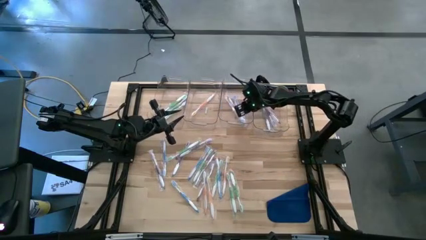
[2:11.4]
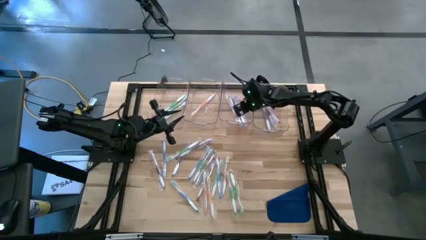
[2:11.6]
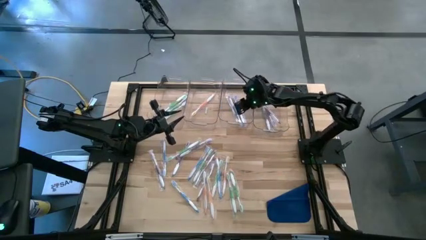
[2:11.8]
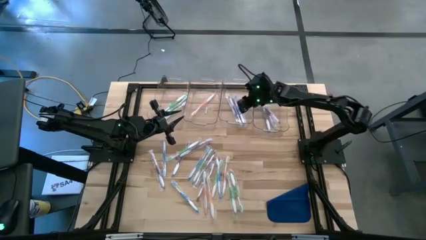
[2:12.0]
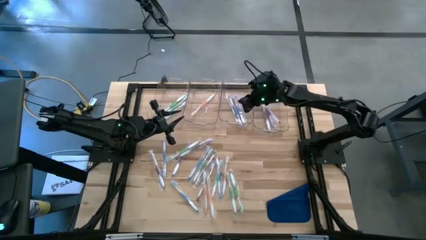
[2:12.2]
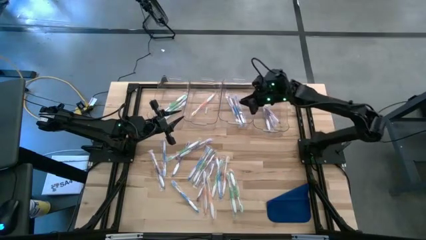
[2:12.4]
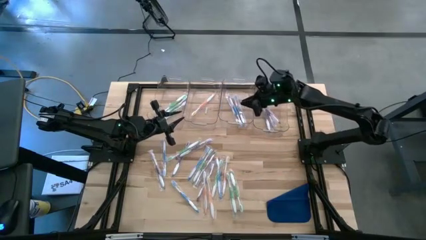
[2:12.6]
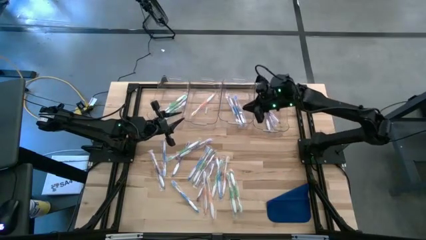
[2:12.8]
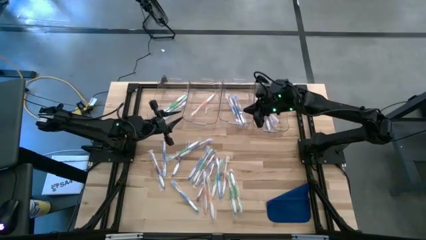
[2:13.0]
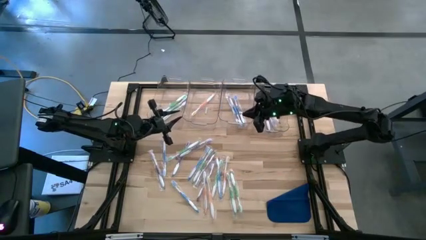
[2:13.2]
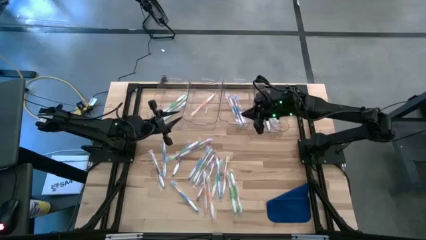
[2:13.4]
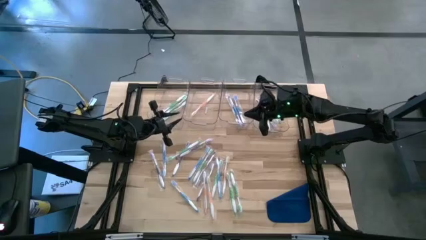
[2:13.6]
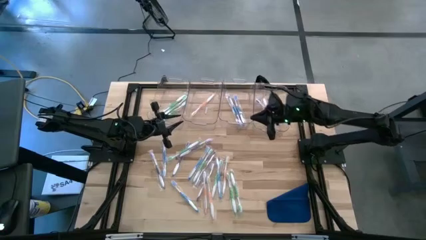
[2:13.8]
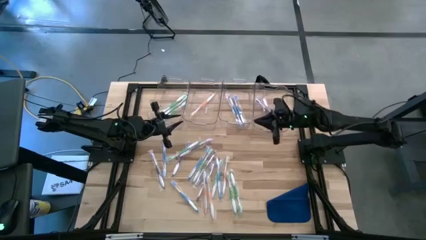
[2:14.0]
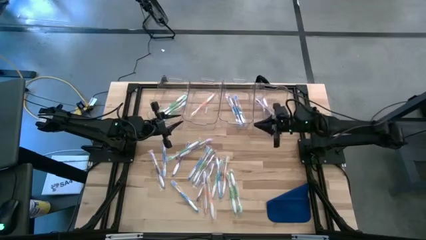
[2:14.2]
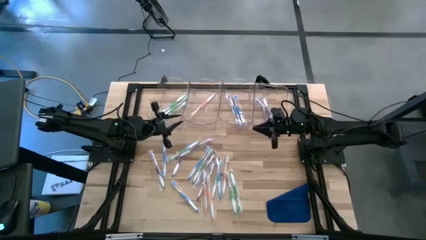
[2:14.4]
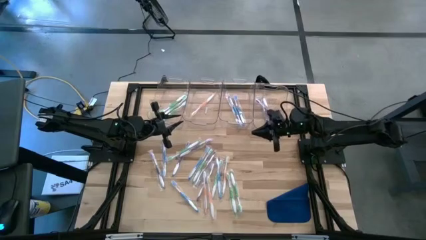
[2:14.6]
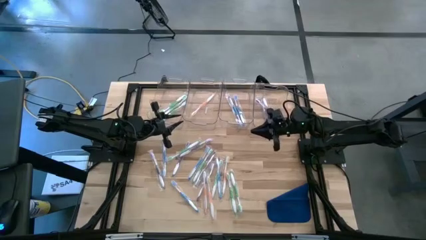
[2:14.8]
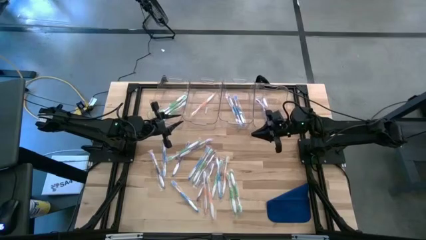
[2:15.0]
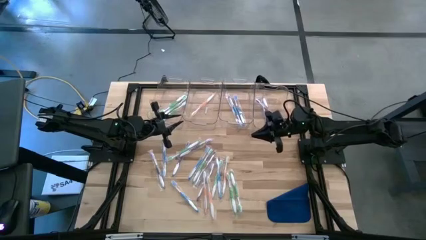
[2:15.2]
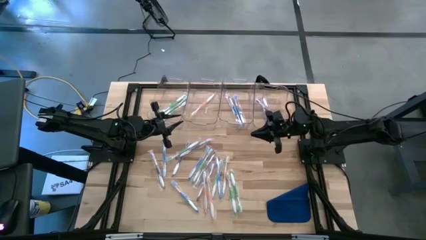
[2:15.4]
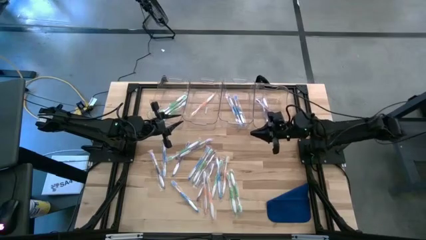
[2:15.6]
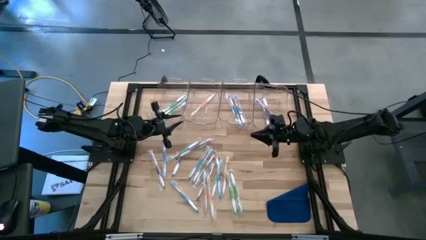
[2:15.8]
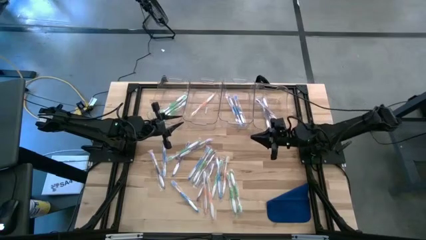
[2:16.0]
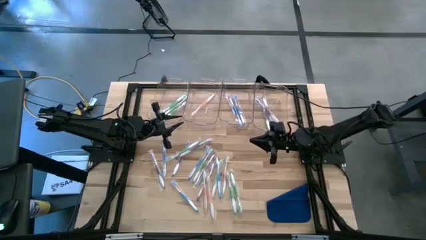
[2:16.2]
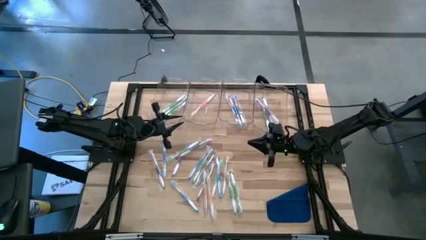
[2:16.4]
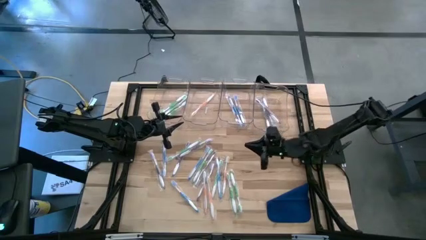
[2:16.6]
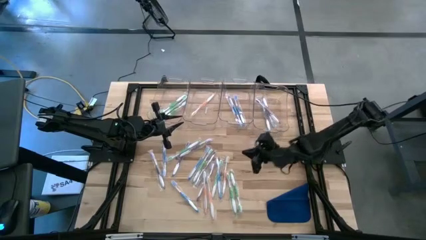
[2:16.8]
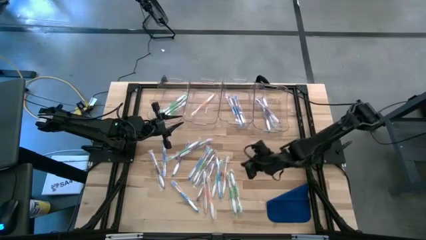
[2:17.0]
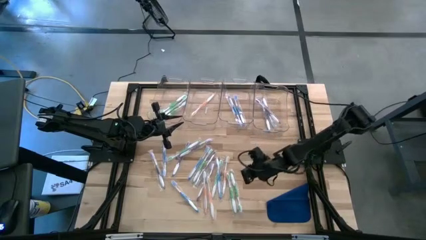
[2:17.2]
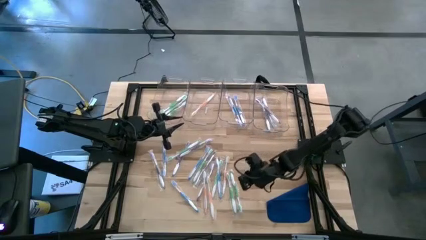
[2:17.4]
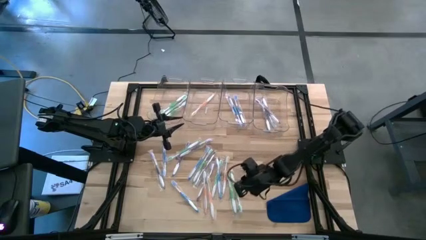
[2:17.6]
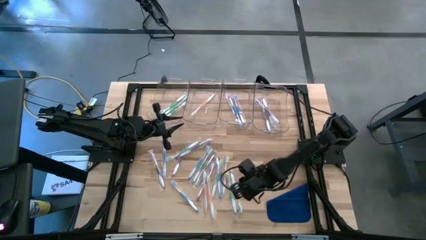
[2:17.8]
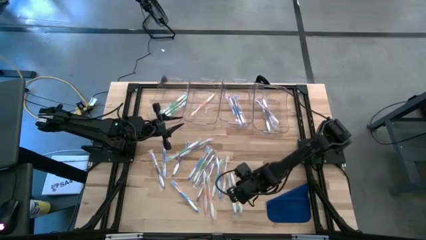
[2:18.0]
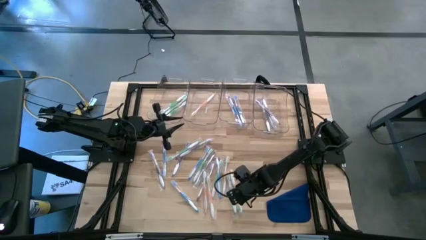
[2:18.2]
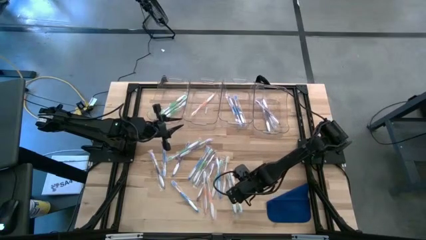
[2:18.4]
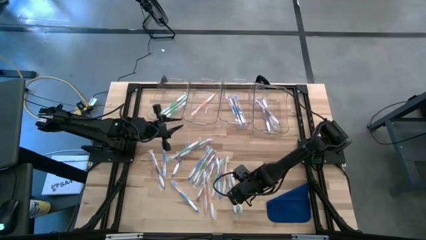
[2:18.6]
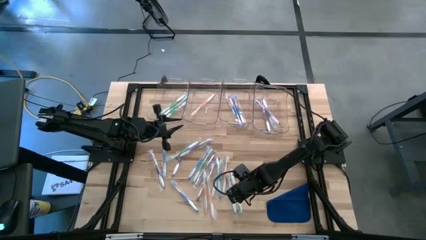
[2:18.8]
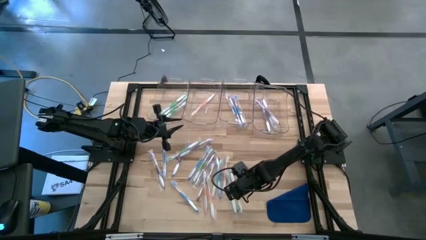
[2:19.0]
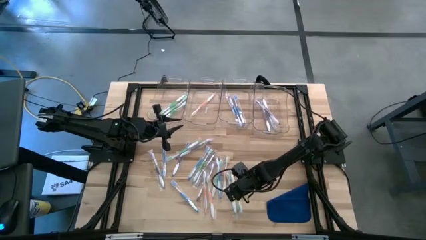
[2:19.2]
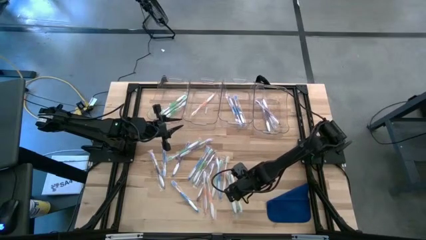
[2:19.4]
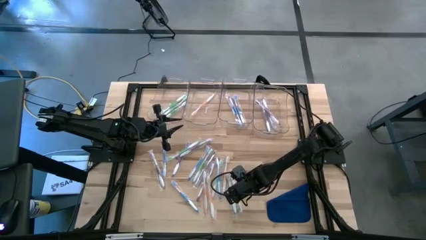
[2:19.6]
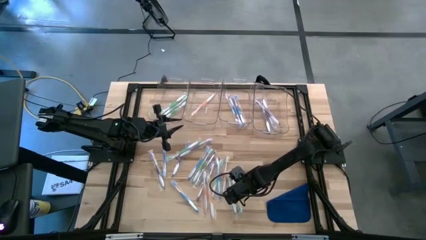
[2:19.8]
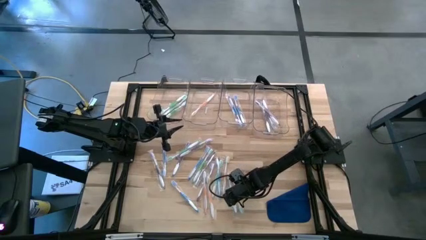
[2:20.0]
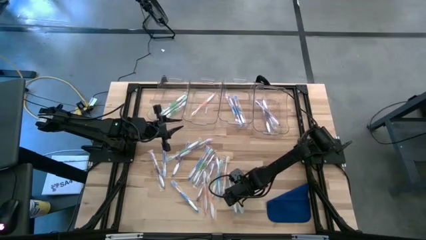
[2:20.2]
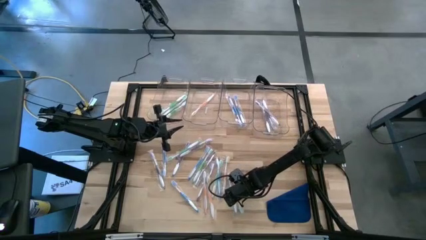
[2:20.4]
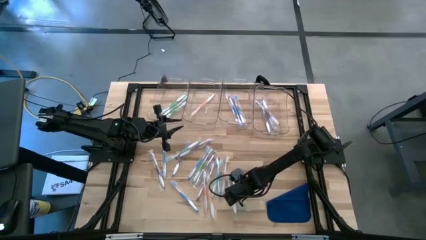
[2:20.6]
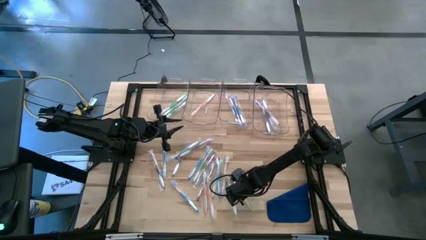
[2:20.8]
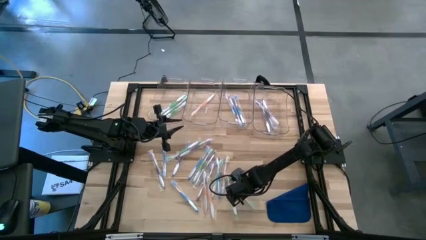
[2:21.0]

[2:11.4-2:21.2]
Task: Pick & Place Toothbrushes
Put the green toothbrush into the left transparent bin

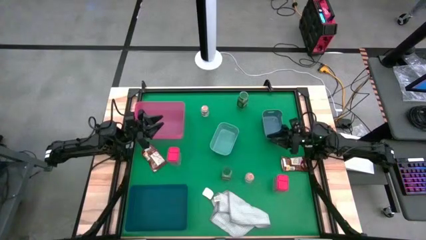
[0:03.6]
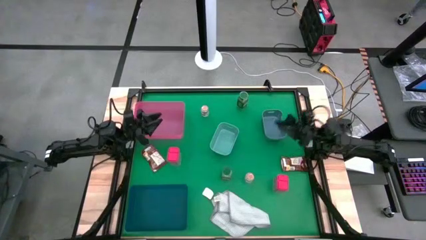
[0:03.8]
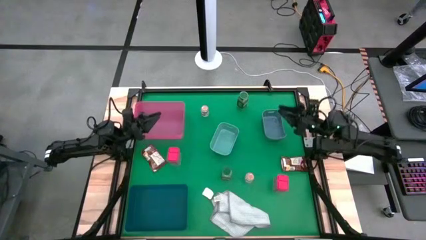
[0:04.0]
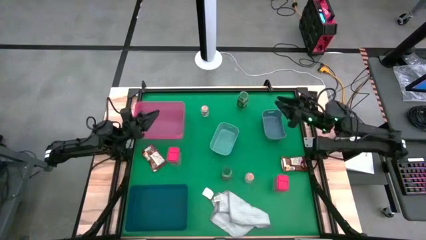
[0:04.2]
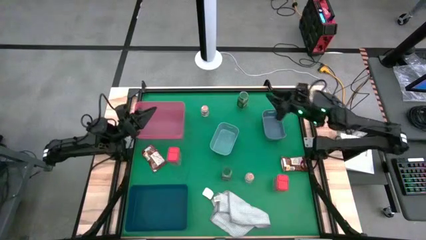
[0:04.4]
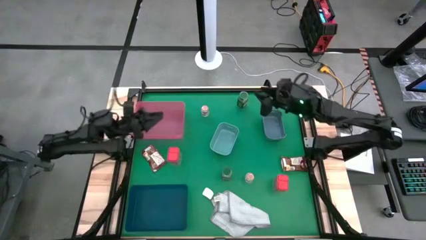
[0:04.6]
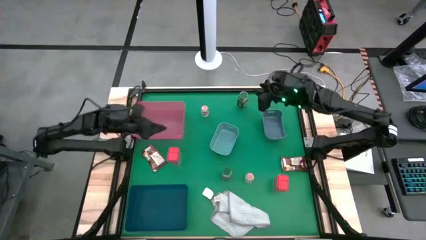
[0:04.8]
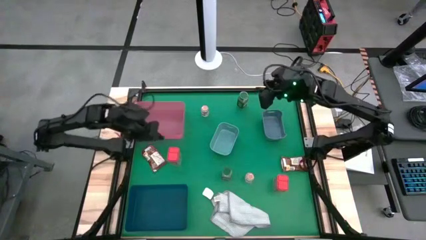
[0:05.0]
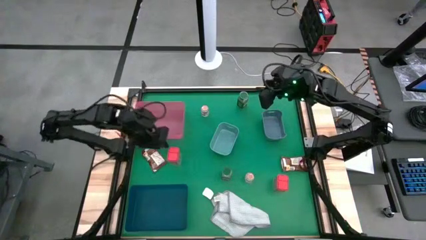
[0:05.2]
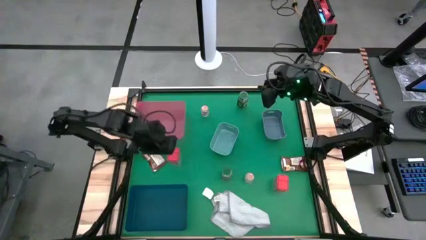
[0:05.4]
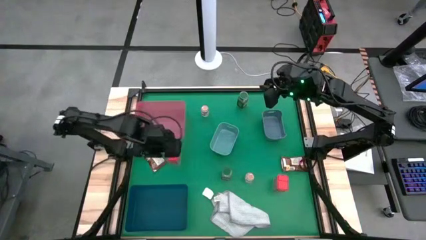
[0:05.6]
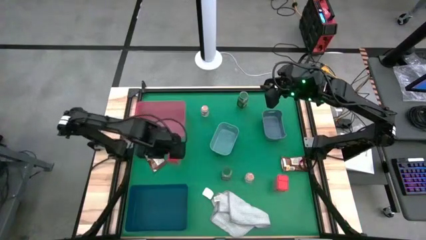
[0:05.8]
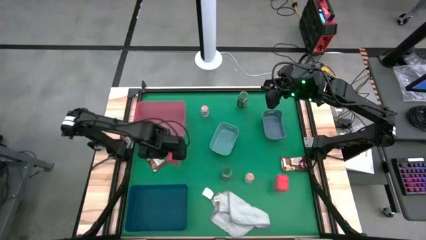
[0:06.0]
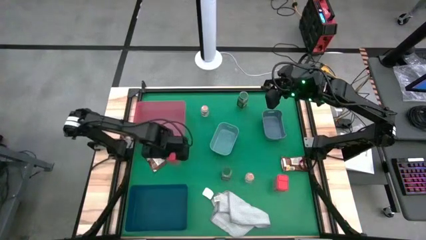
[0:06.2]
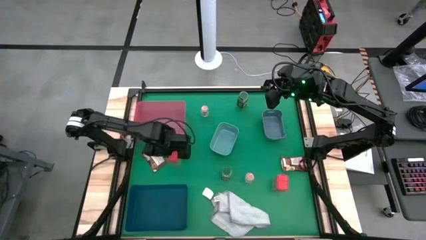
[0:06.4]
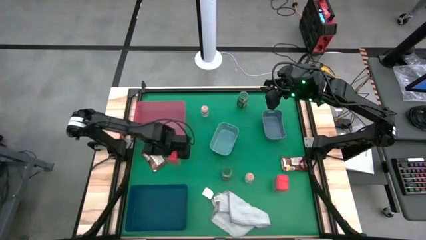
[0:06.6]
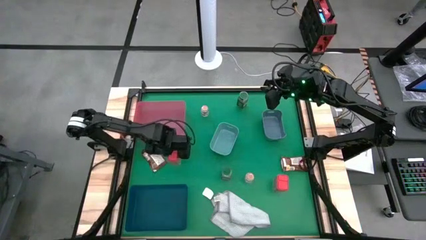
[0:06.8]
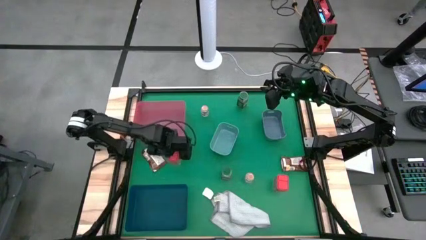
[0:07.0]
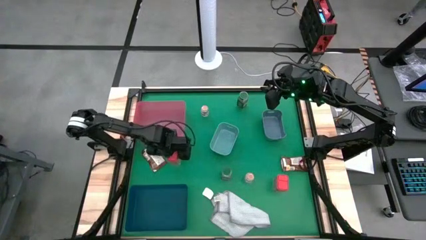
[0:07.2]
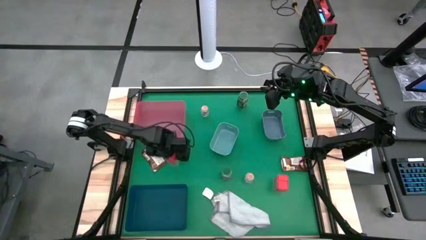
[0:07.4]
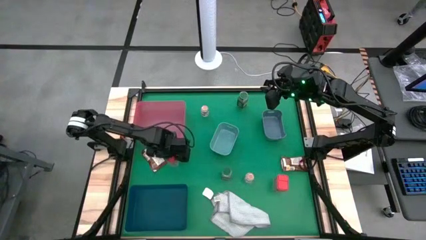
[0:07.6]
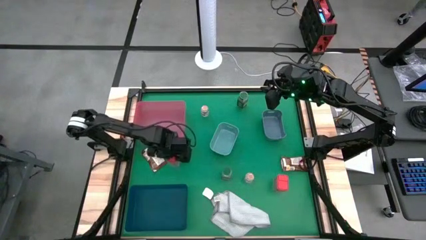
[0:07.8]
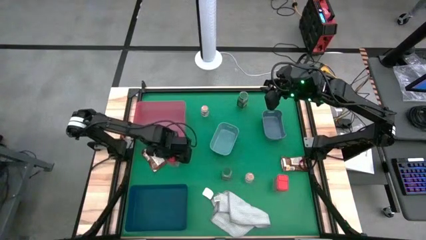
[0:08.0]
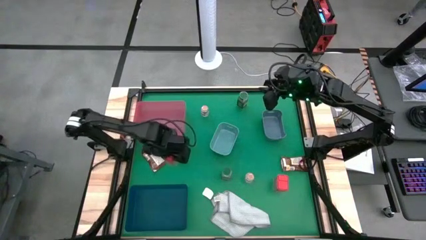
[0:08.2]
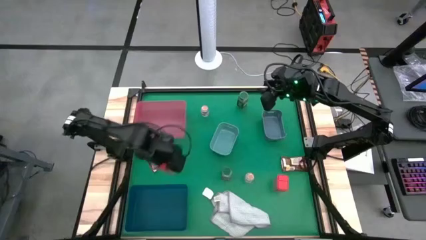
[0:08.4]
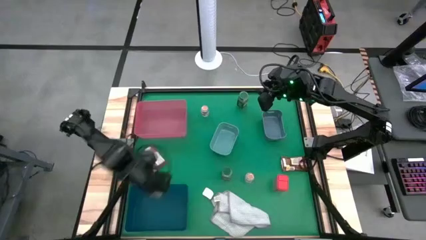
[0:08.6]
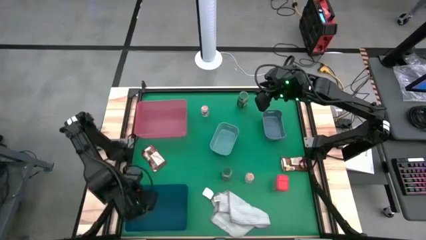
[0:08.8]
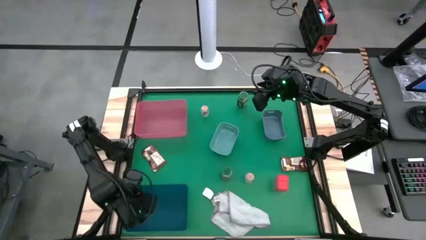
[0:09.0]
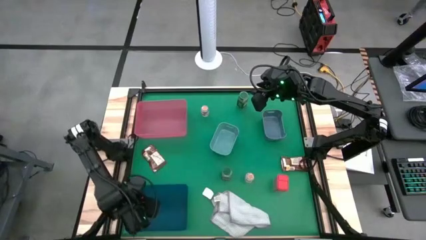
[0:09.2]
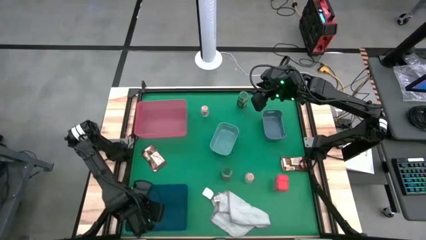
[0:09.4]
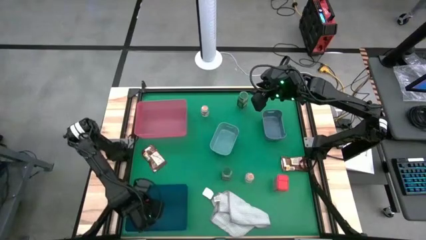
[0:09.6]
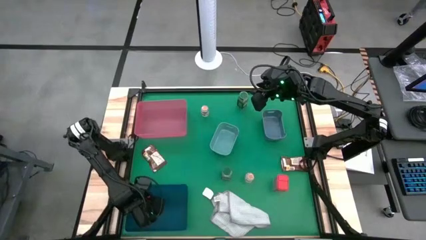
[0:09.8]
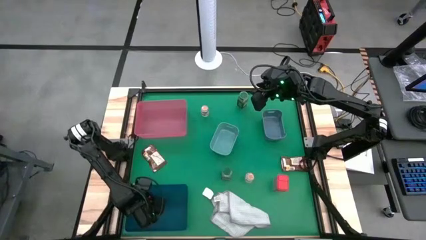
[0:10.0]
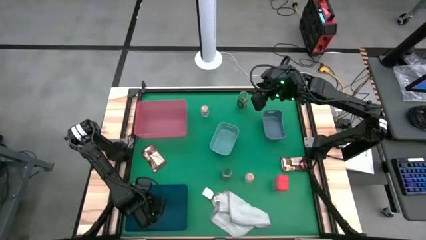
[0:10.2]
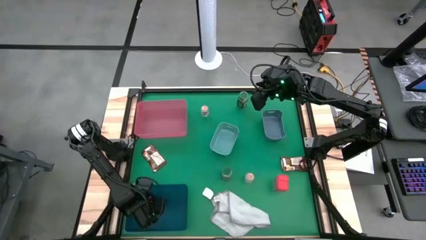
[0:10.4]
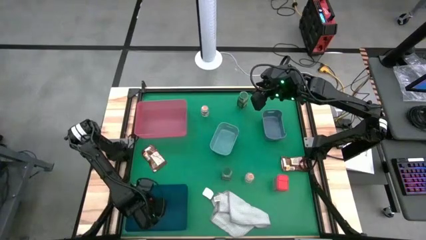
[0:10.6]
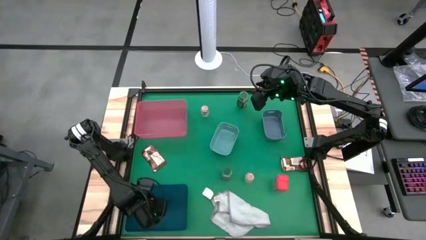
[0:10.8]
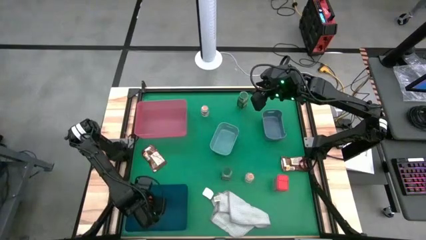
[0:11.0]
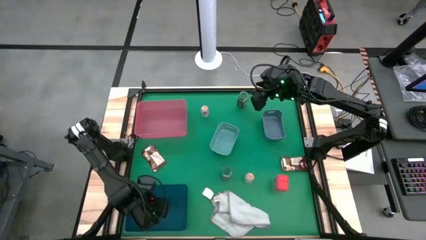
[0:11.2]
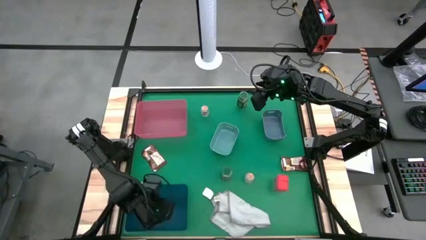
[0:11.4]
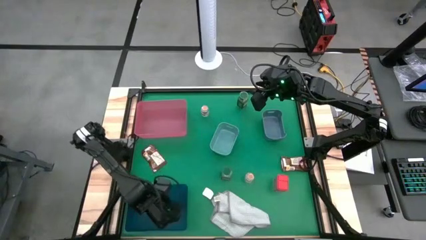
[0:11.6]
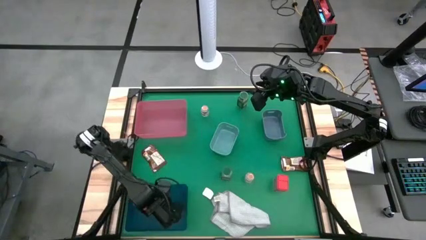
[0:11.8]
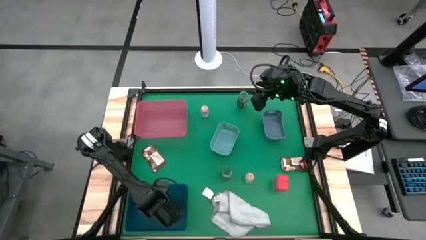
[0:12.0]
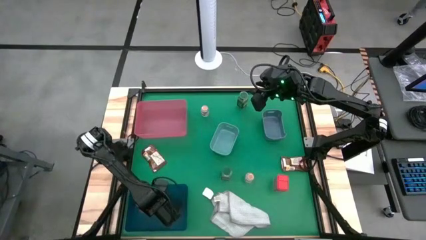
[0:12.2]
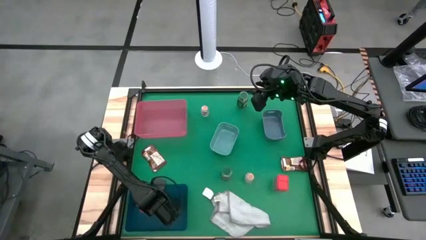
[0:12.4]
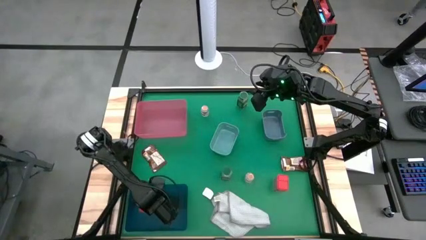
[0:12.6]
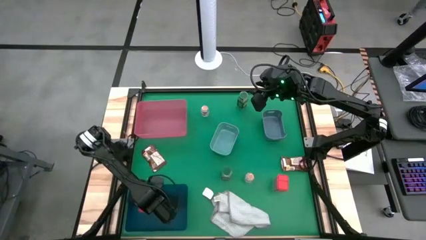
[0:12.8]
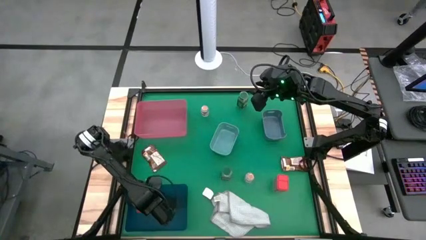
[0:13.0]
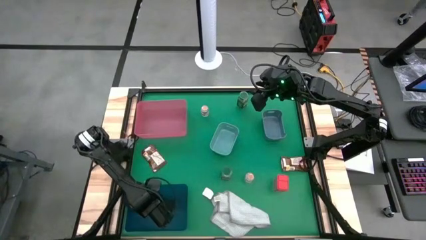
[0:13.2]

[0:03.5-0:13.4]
Task: Sort spices by type
Put the left red seasoning can into the dark blue bin
